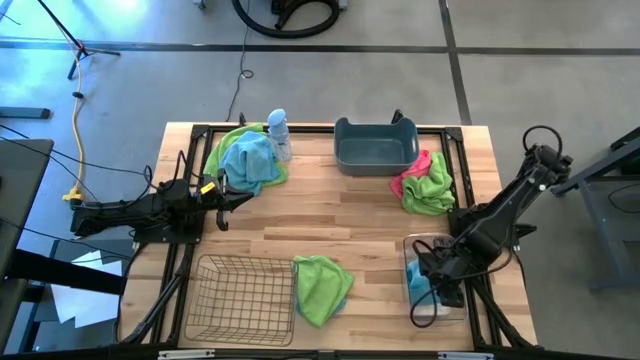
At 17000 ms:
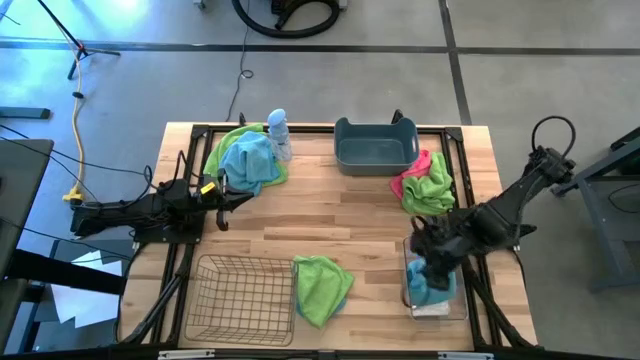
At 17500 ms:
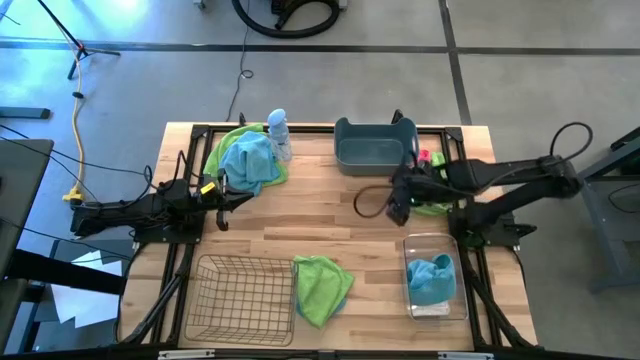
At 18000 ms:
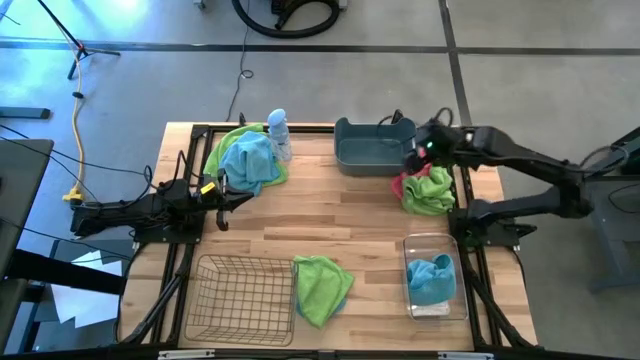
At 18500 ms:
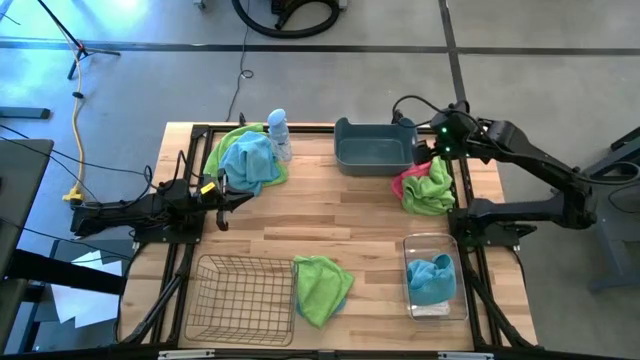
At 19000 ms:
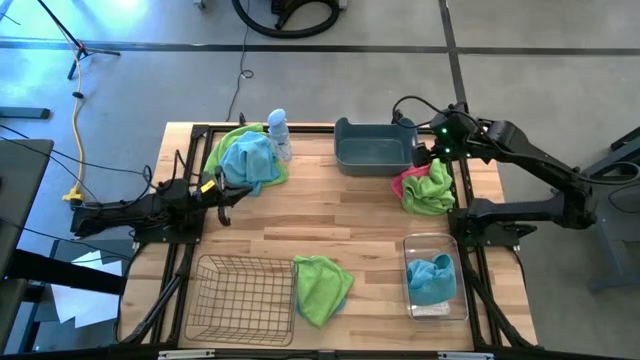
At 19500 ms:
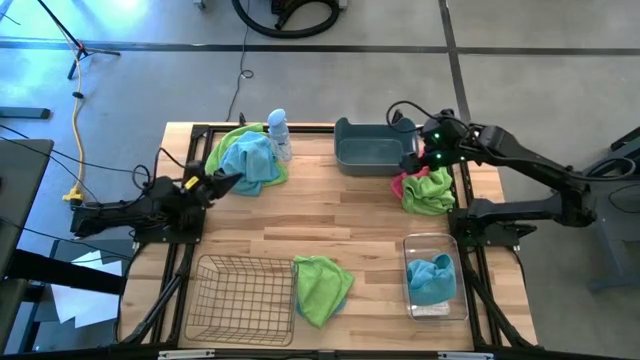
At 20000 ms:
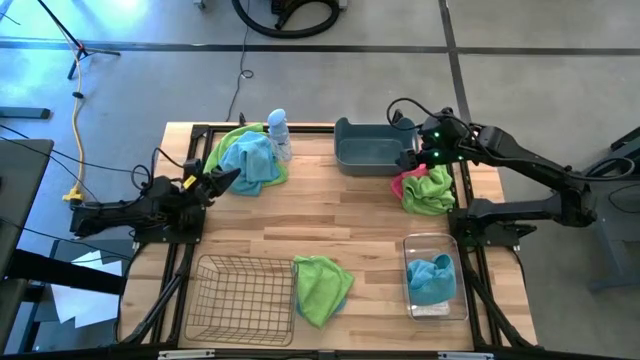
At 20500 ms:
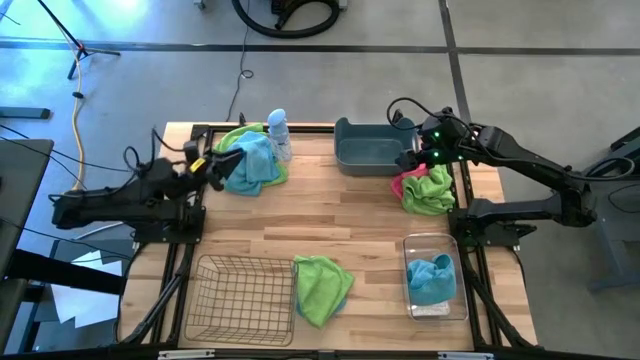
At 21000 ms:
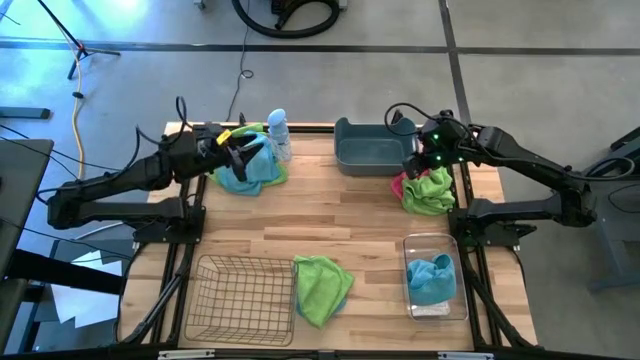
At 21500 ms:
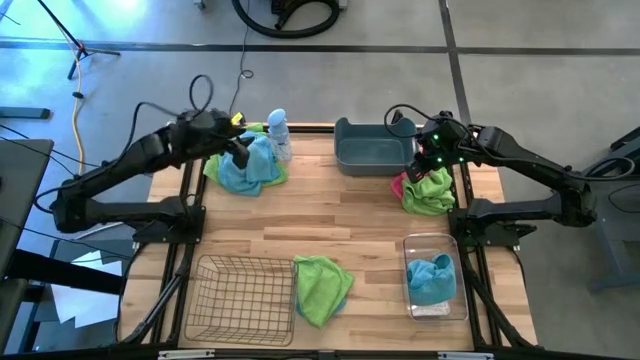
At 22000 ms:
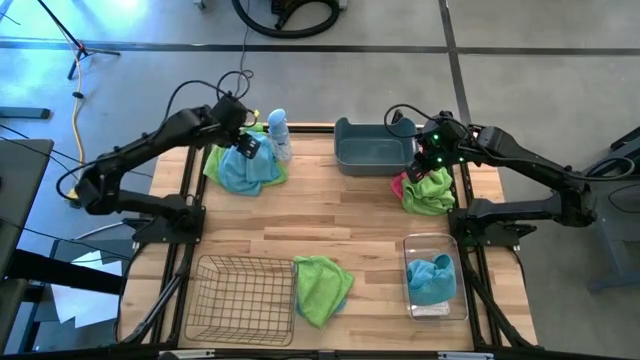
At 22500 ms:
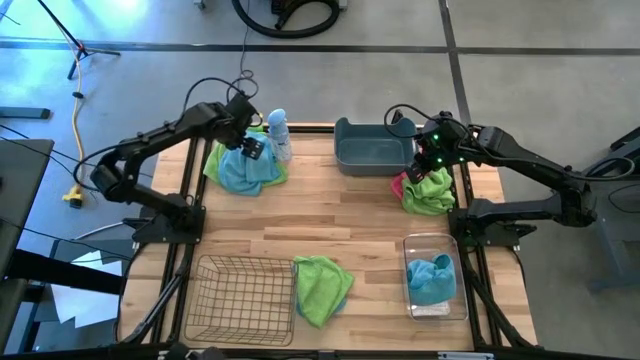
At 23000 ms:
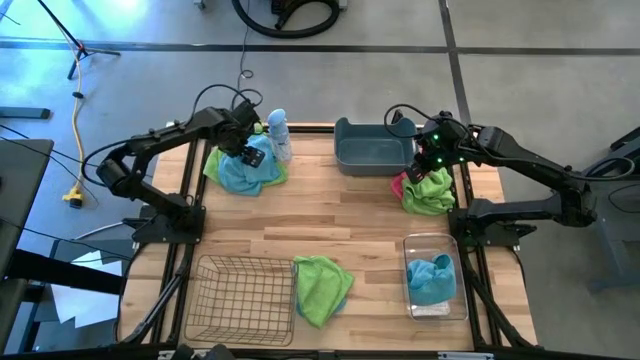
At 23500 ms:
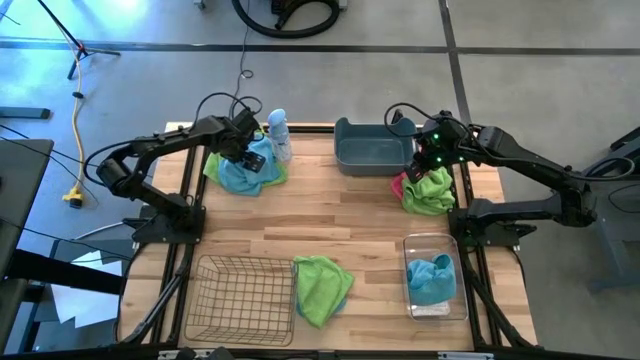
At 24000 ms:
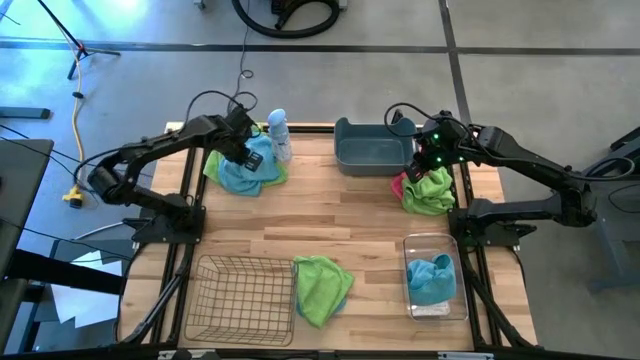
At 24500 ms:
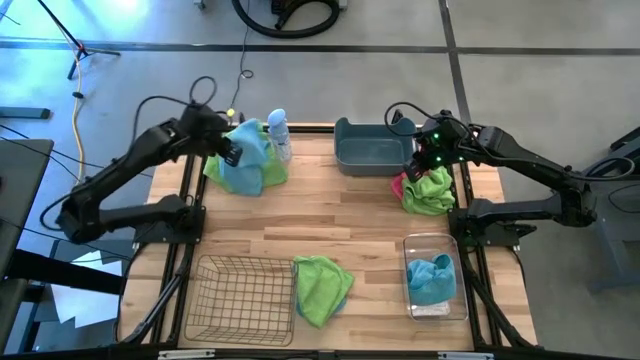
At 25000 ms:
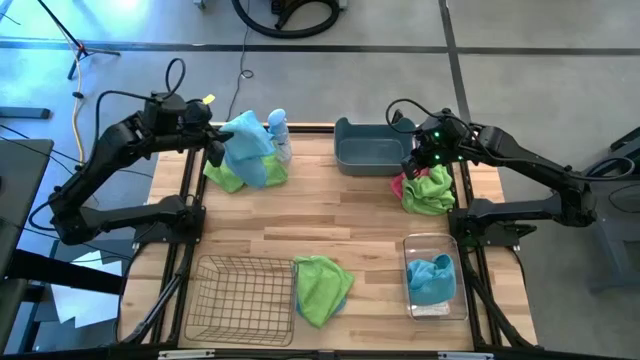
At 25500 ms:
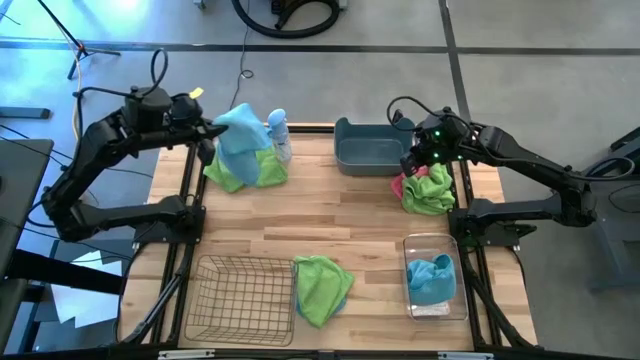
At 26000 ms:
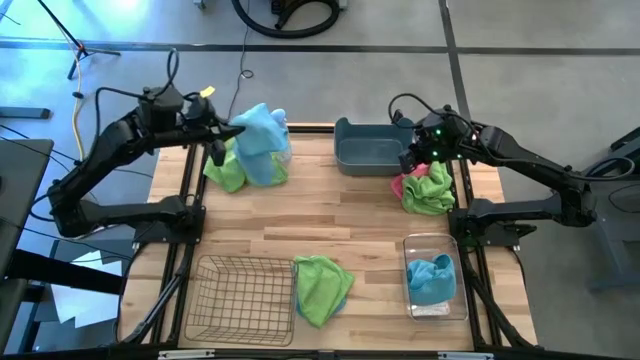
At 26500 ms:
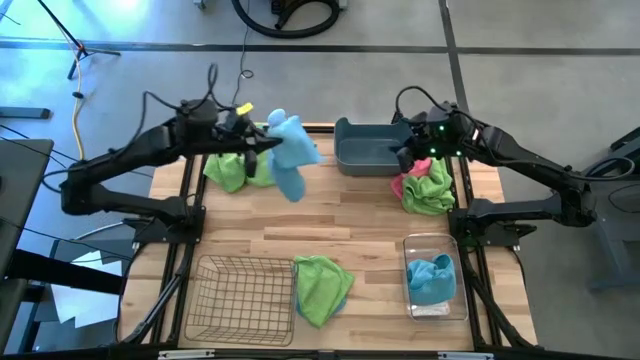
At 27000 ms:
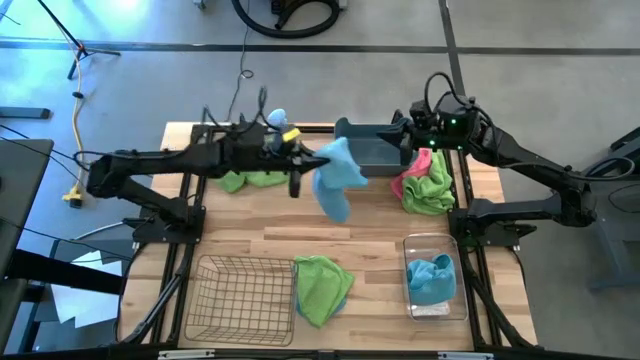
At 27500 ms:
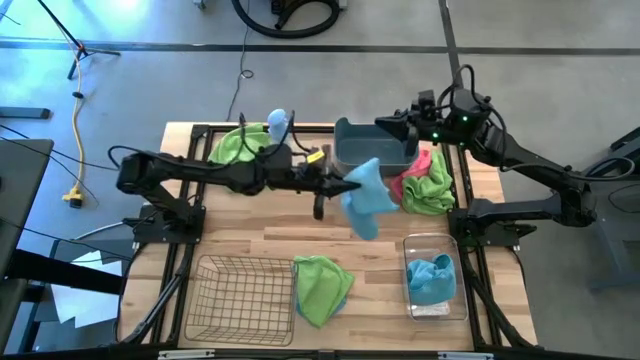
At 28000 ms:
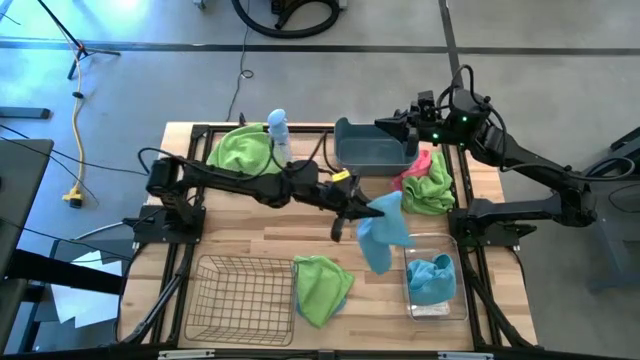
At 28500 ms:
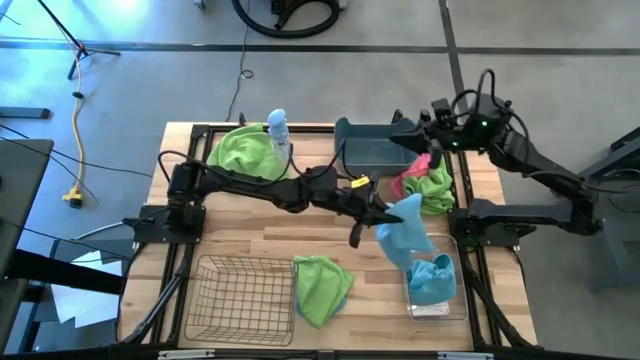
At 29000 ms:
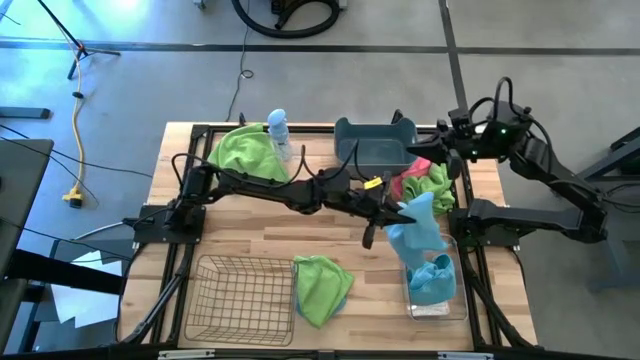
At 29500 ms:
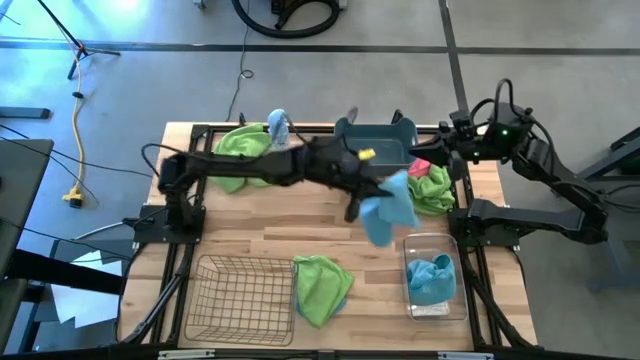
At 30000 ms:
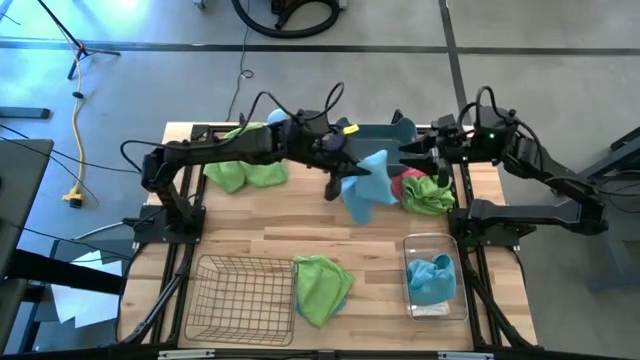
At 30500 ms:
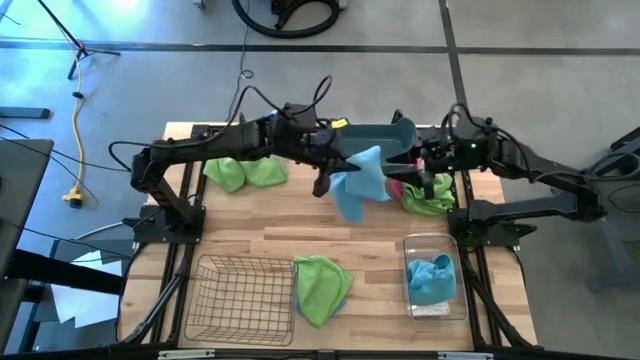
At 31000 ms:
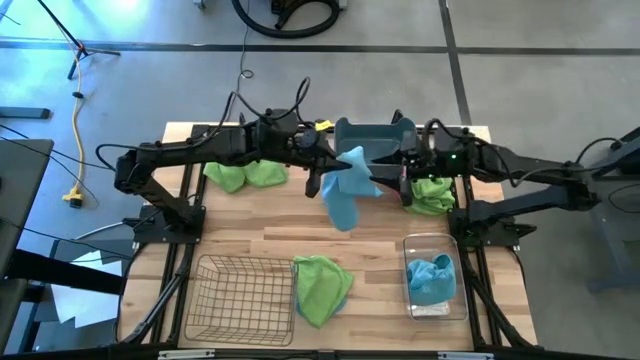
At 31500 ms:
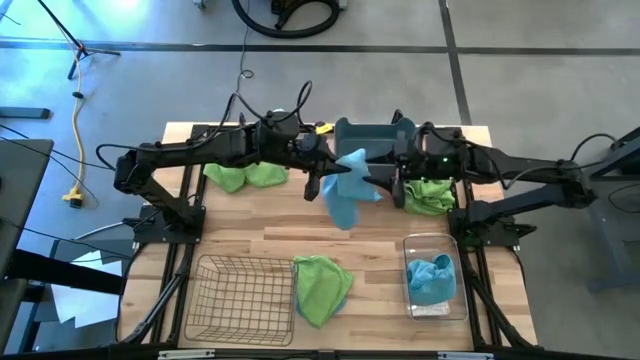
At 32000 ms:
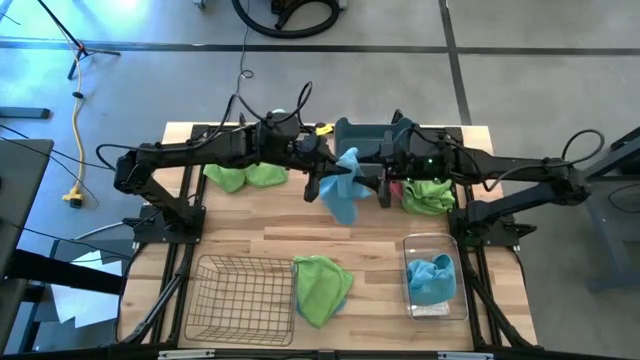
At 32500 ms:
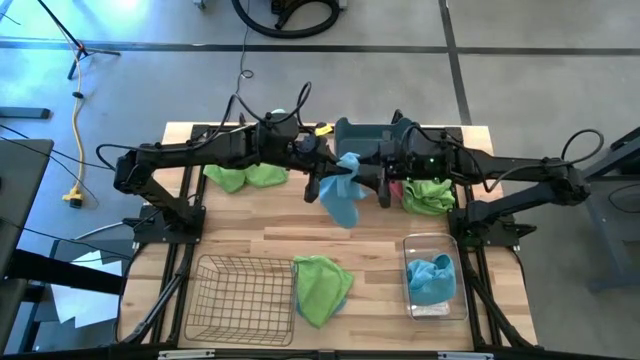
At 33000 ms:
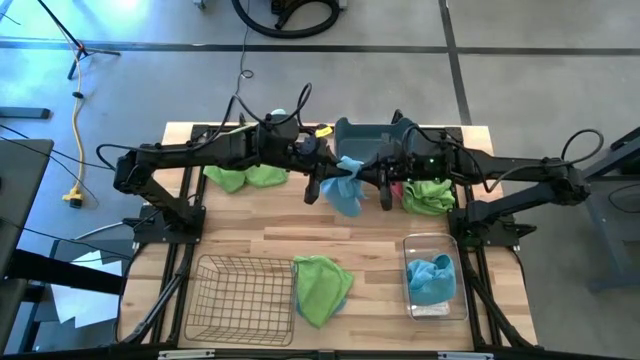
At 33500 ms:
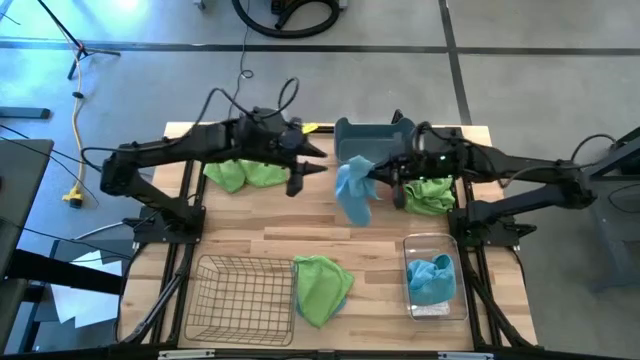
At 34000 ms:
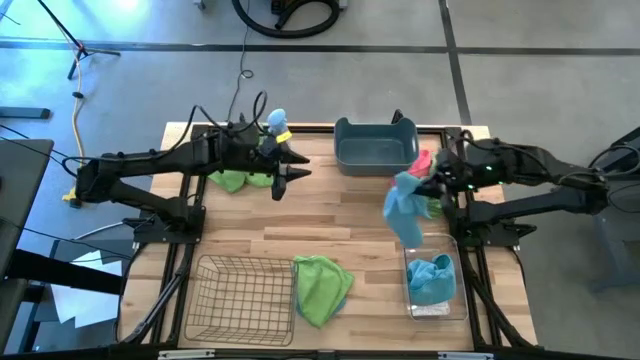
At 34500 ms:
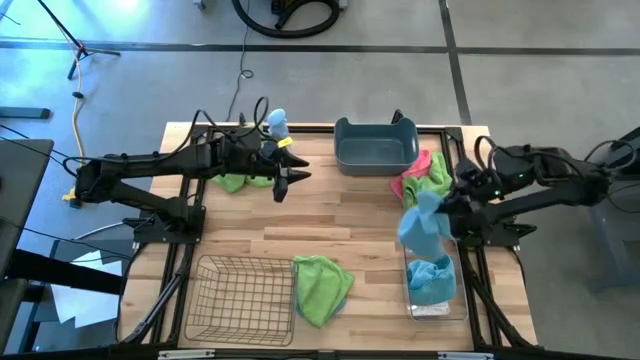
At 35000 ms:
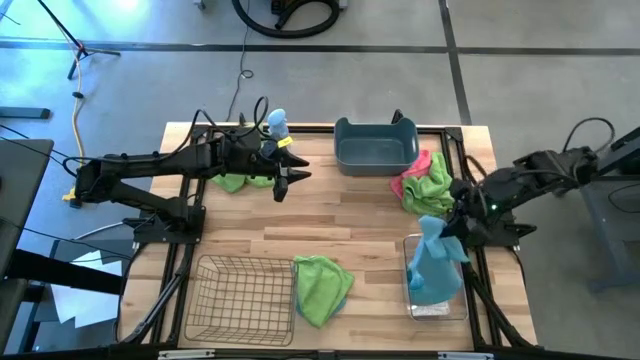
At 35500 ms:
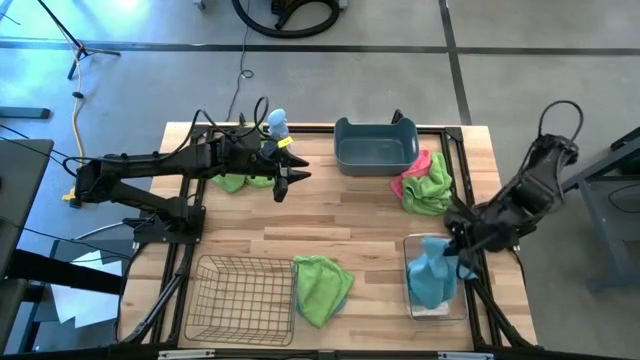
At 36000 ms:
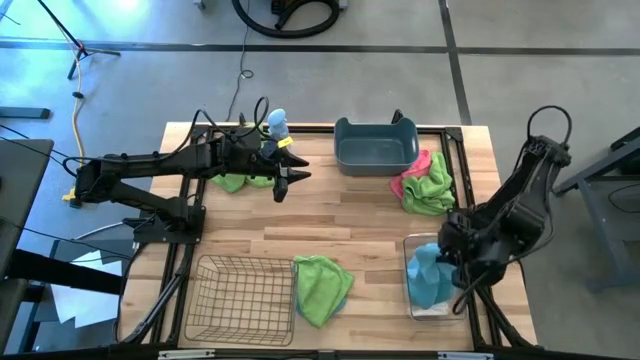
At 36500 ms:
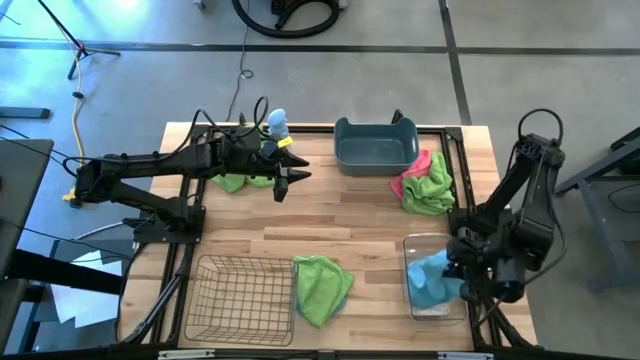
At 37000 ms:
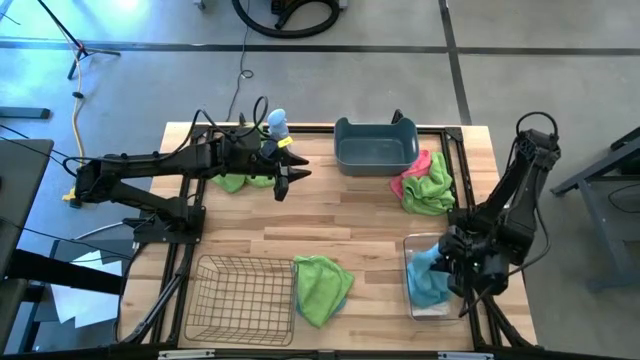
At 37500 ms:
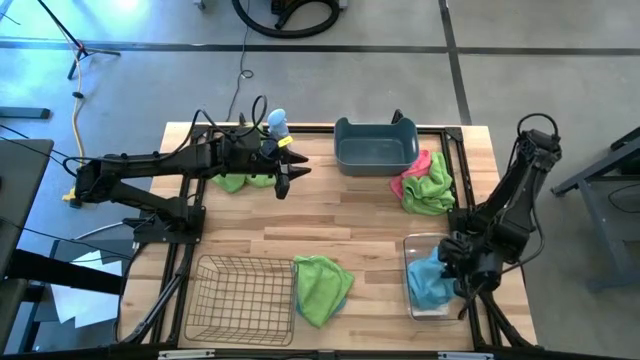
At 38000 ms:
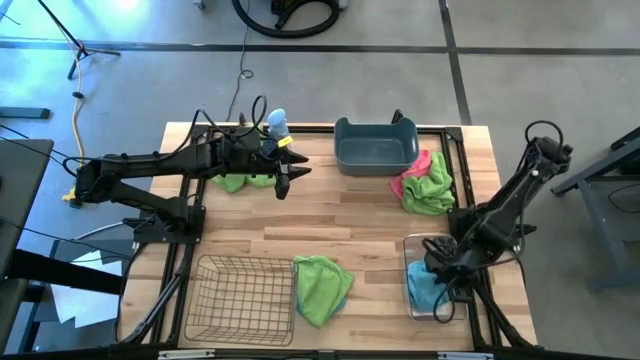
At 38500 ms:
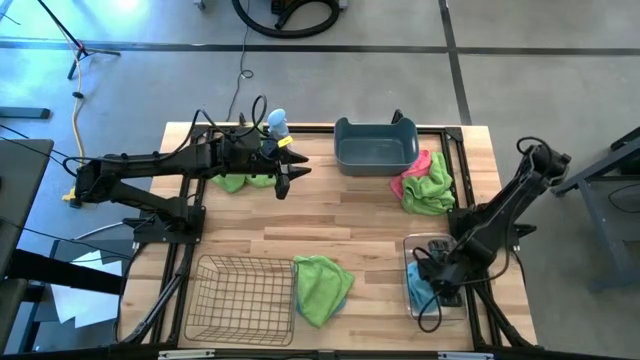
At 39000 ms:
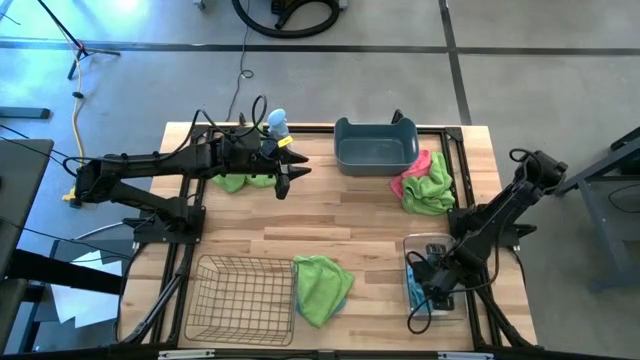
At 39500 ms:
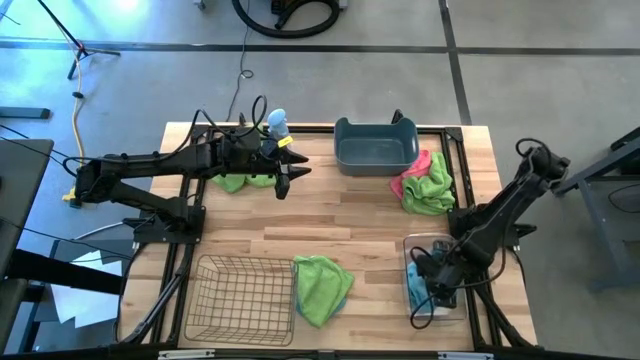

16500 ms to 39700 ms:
Task: Sort microfiber towel by color & place in baskets
Put the left blue towel into the transparent bin
